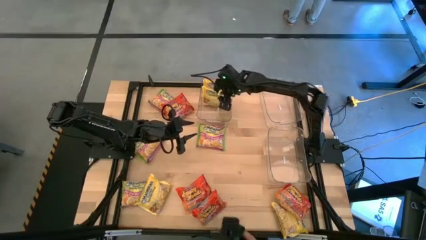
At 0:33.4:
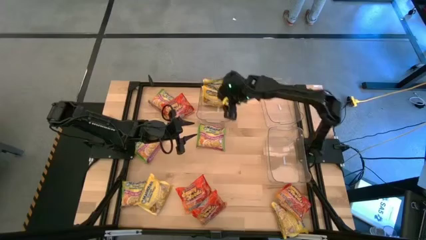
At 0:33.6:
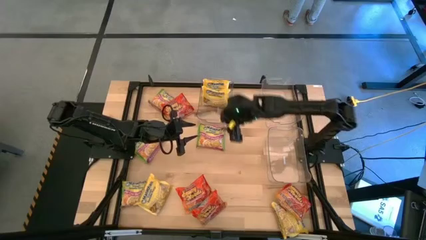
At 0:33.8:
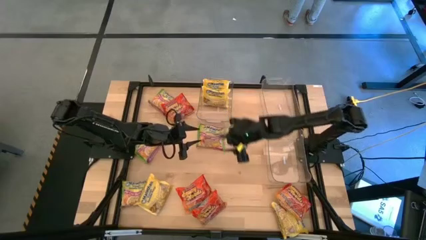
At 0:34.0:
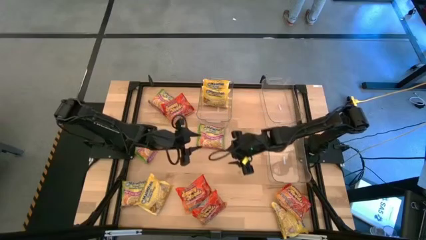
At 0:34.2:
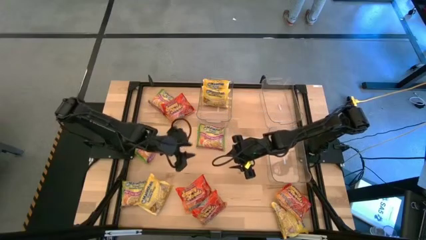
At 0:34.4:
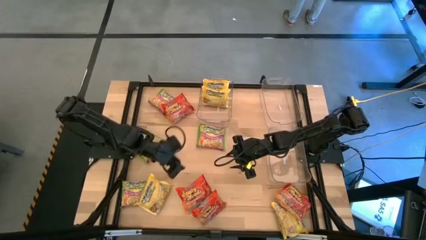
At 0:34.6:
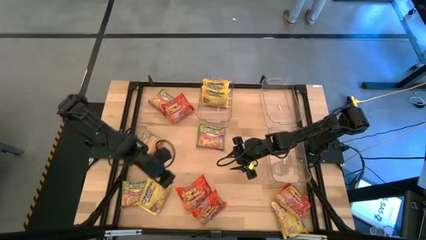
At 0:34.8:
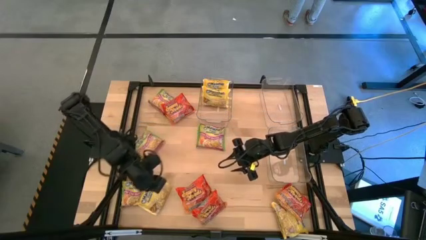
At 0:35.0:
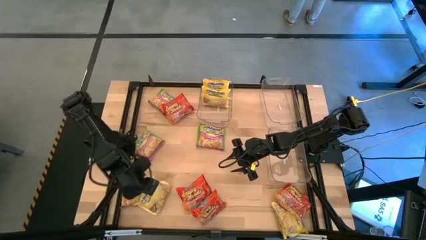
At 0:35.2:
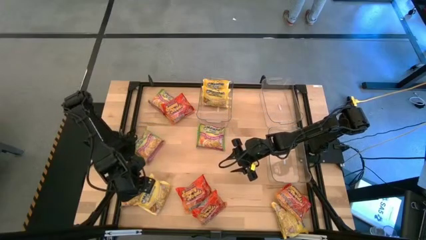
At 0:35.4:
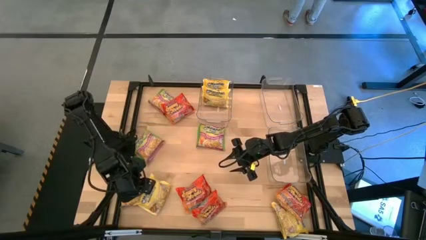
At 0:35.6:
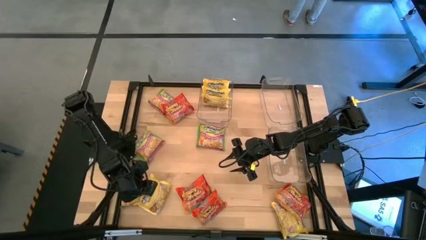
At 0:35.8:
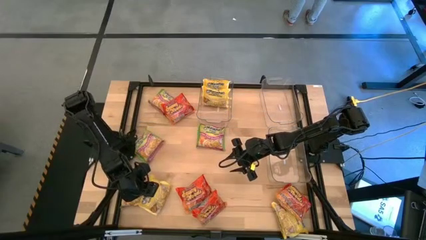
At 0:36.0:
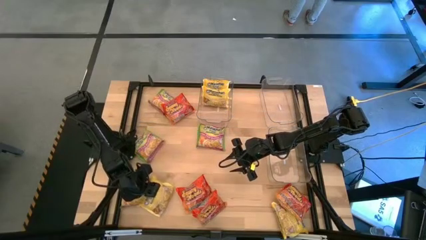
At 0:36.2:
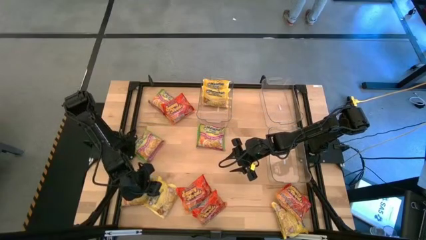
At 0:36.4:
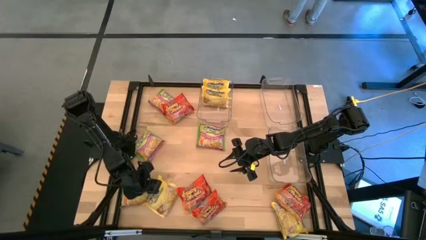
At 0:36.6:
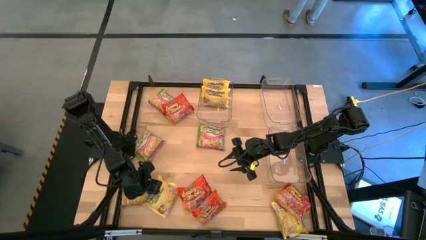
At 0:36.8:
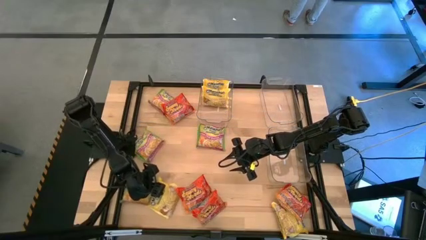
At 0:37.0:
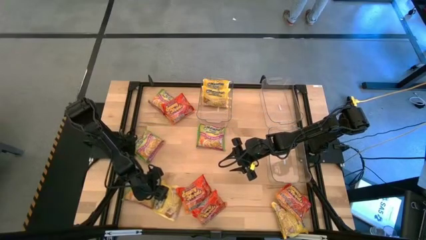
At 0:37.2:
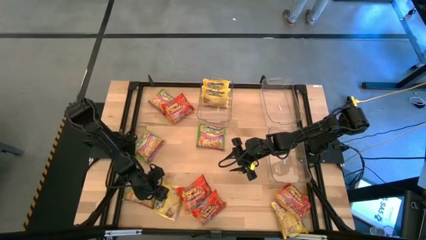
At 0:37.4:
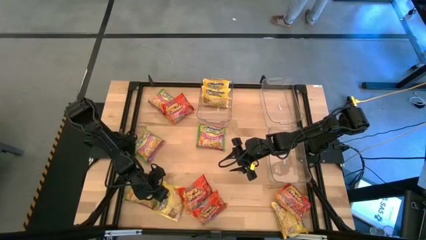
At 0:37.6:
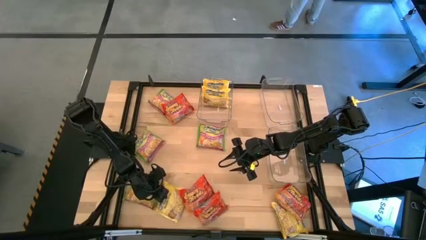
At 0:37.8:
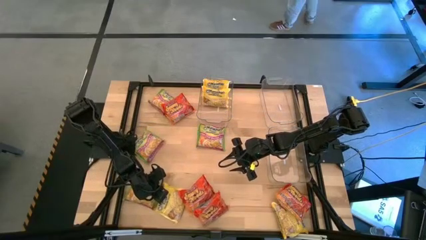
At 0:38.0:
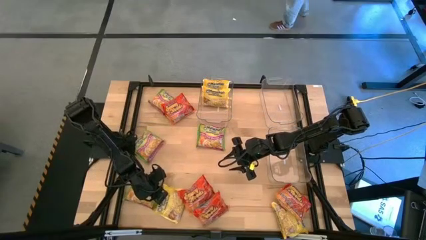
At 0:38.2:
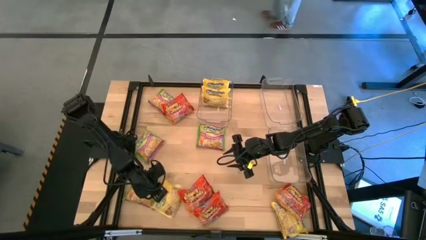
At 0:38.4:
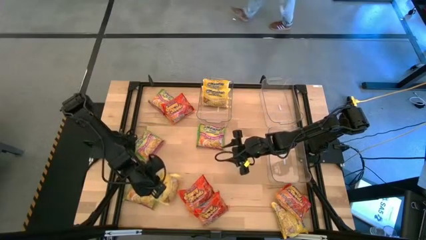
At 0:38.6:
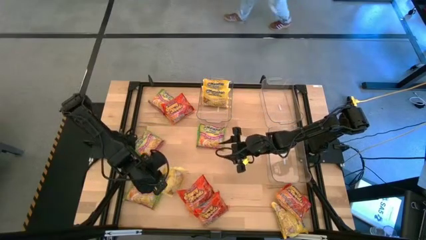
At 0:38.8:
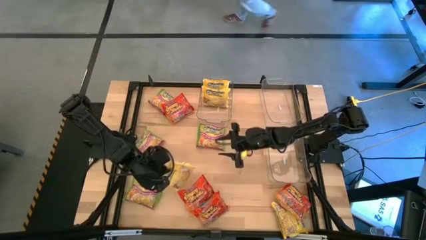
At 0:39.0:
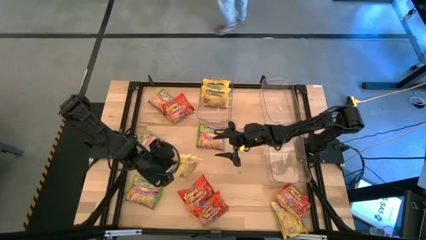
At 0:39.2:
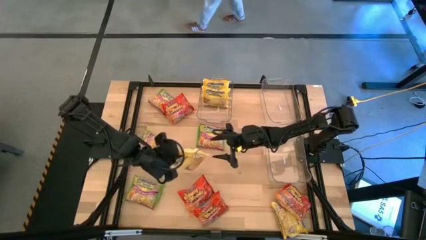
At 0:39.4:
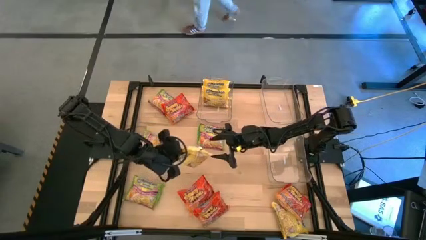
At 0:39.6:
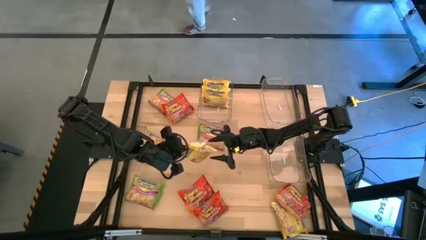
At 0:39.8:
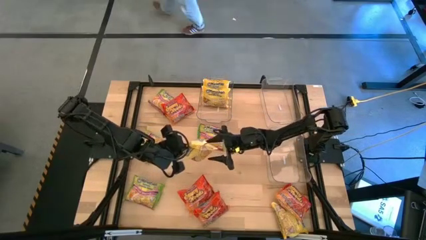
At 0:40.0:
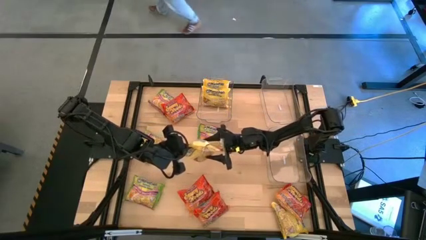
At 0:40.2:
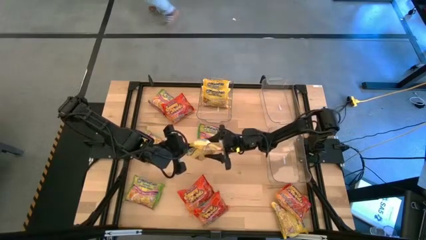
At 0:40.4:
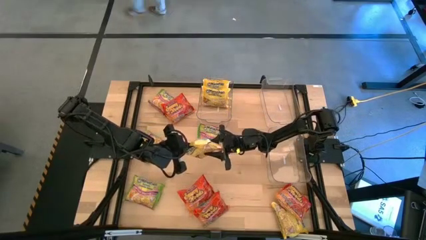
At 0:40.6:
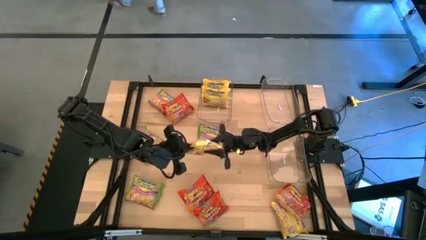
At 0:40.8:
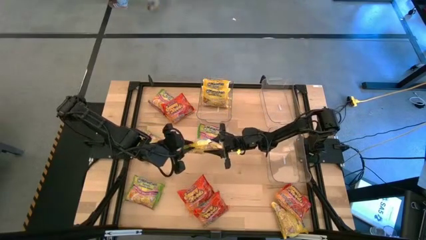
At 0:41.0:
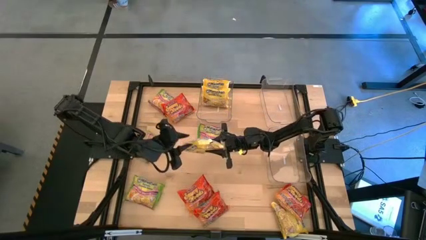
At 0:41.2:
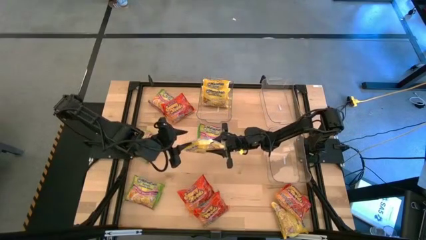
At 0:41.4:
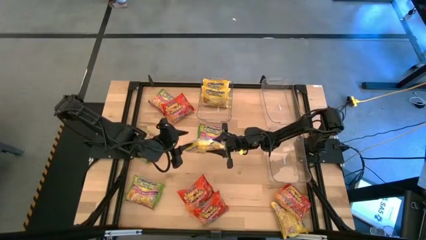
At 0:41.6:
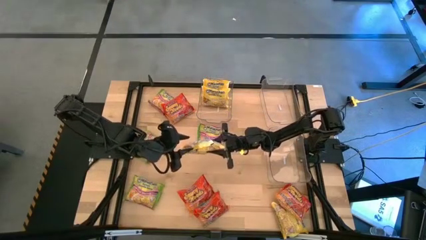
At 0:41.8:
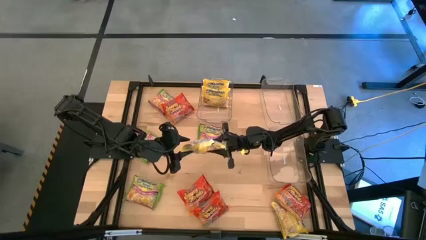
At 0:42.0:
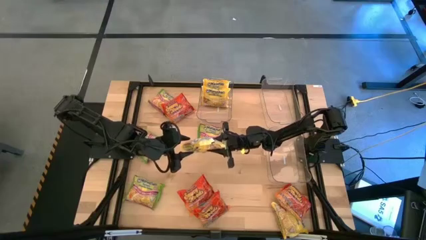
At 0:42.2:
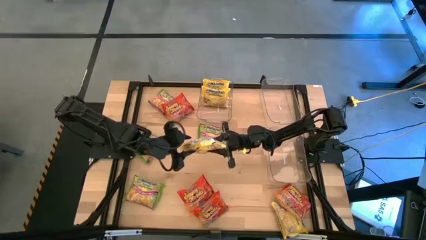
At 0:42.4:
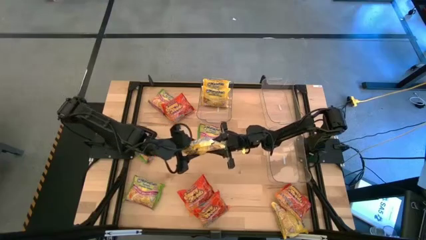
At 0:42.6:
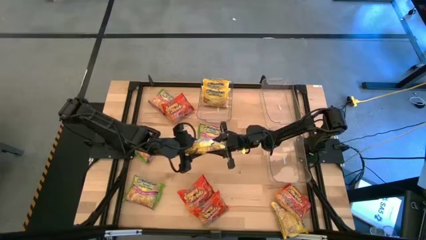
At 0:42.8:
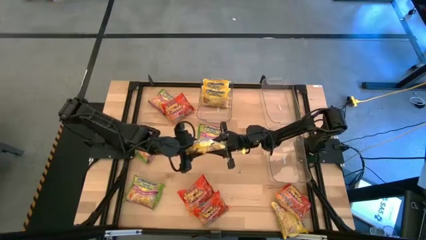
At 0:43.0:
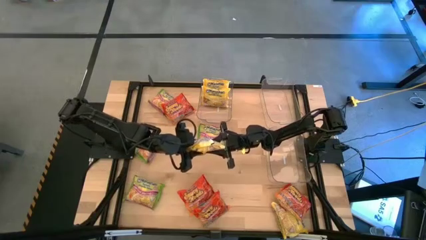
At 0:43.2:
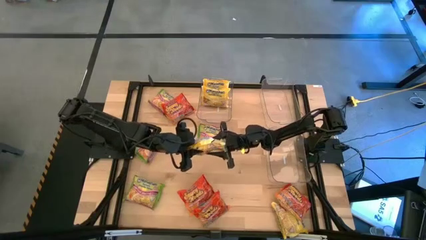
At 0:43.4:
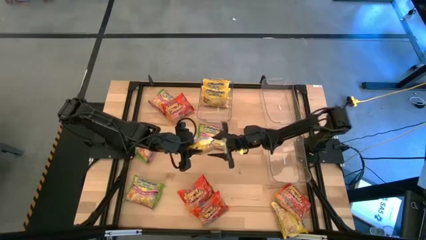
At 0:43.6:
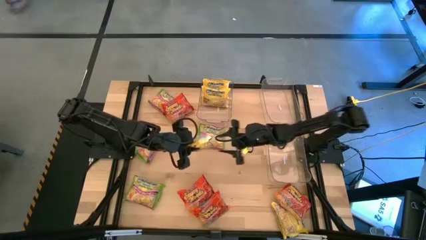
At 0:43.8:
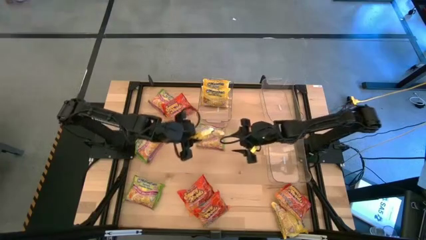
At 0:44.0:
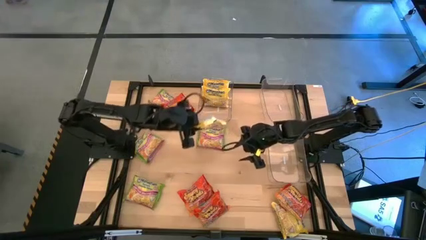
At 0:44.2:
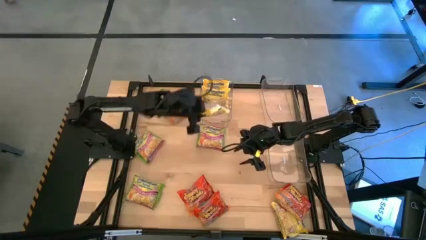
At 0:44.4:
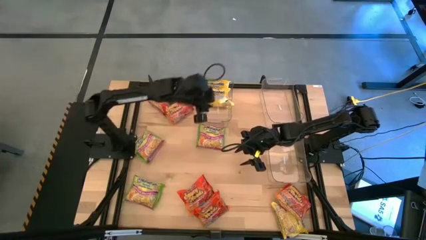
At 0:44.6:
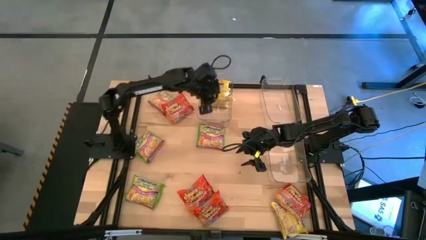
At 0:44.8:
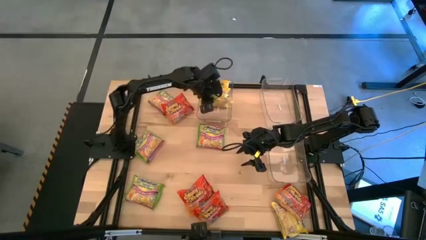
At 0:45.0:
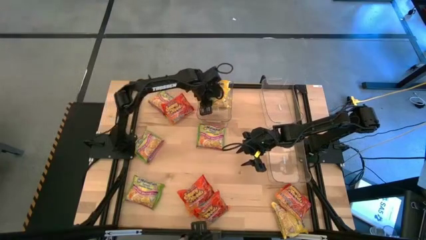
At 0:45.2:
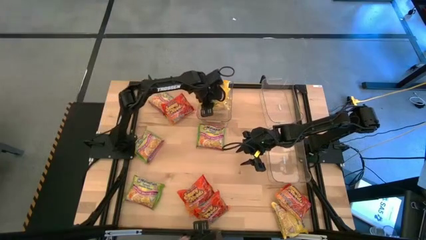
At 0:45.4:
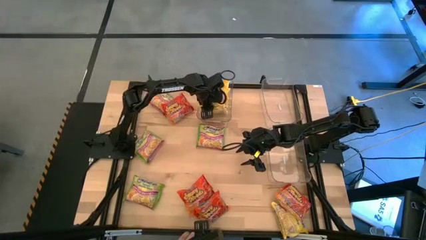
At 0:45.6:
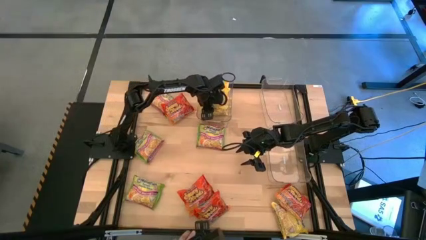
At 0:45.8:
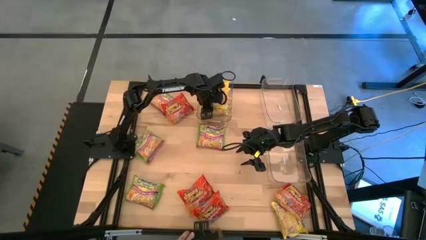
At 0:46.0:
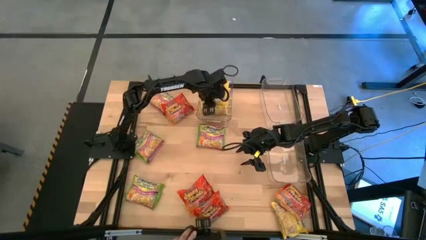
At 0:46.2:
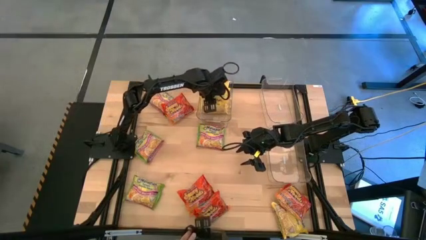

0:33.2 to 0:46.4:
Task: Sort Maruchan noodles
Put the yellow noodle pack into the top left transparent bin
